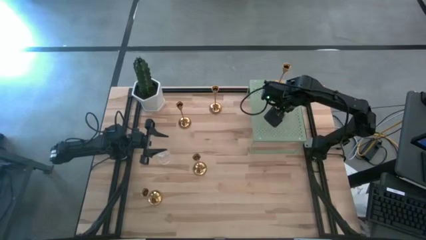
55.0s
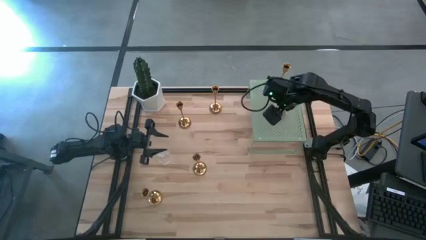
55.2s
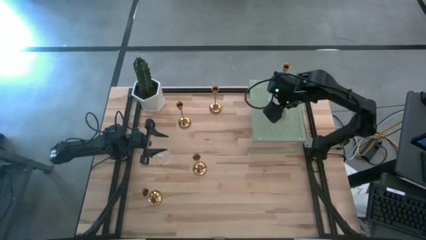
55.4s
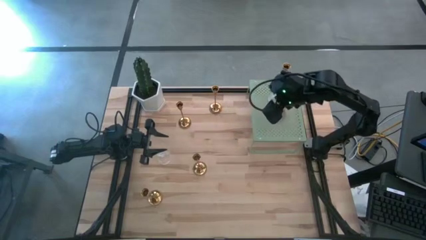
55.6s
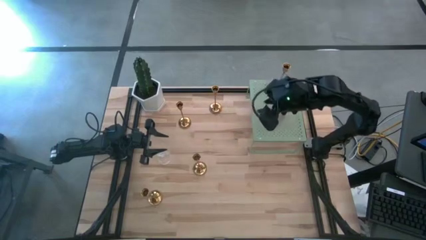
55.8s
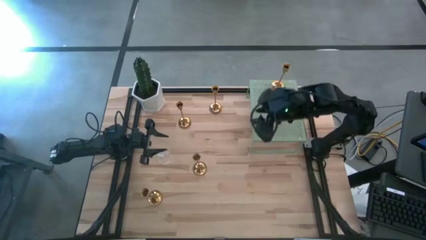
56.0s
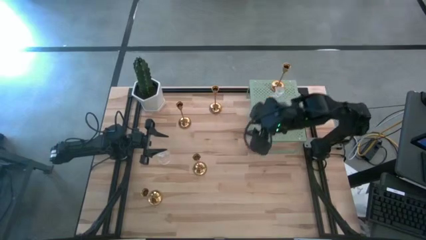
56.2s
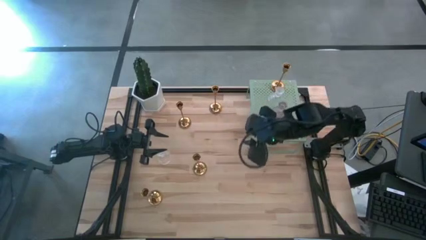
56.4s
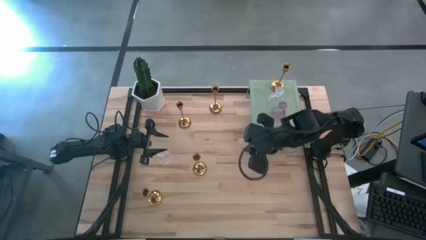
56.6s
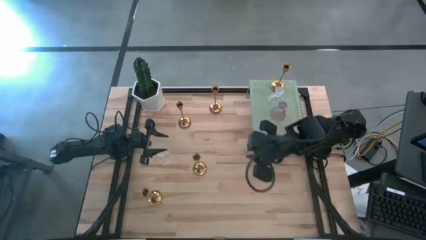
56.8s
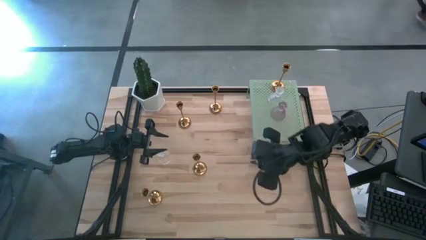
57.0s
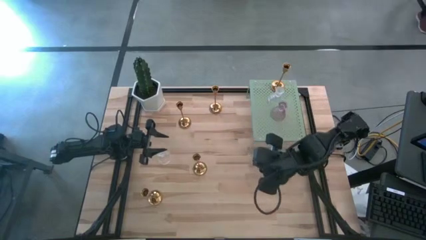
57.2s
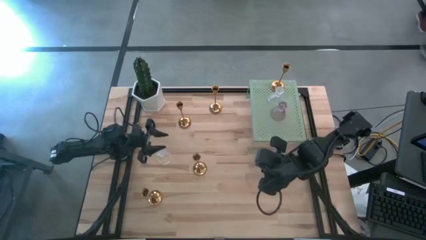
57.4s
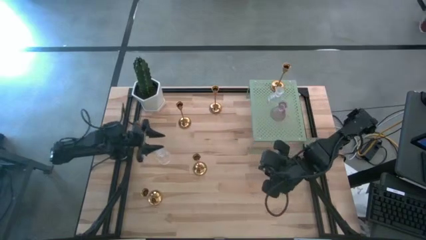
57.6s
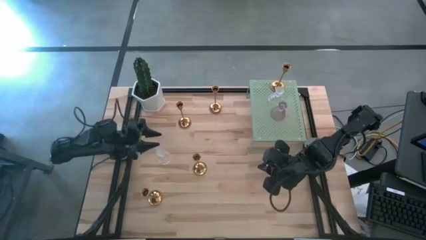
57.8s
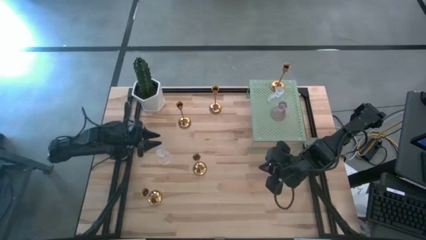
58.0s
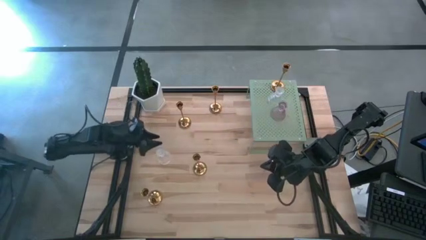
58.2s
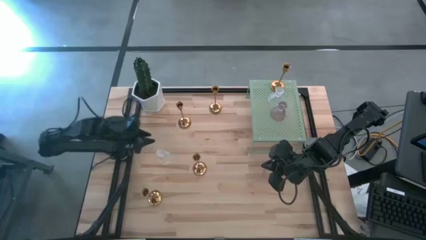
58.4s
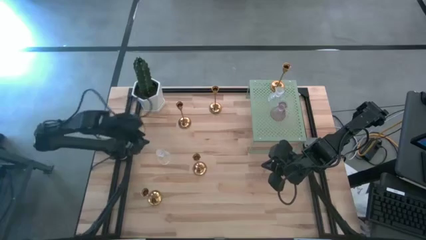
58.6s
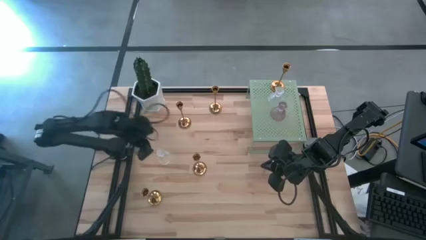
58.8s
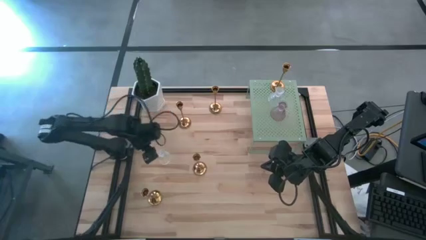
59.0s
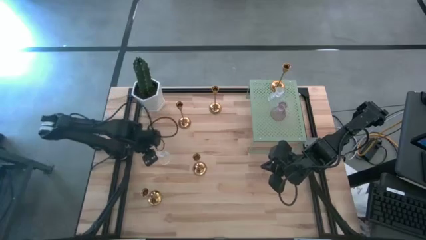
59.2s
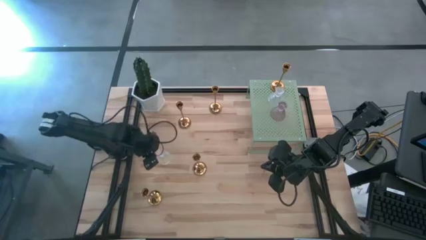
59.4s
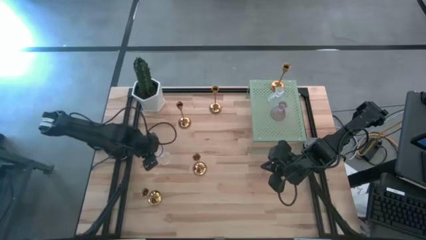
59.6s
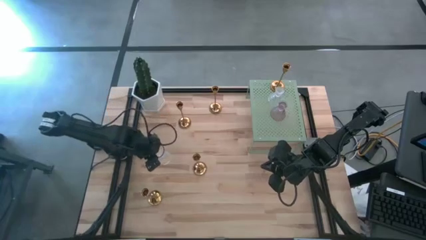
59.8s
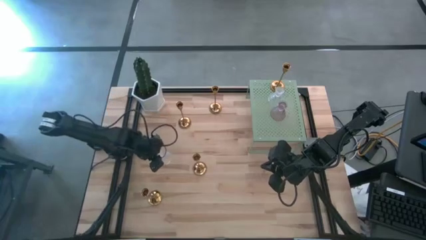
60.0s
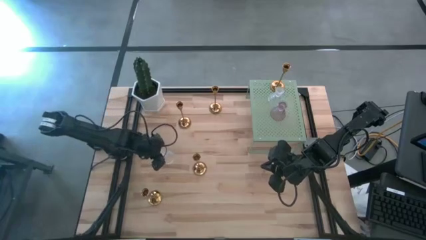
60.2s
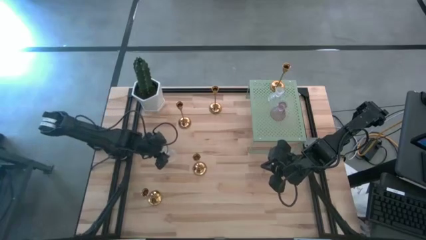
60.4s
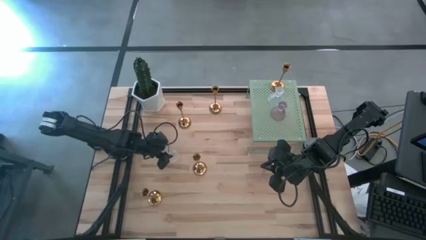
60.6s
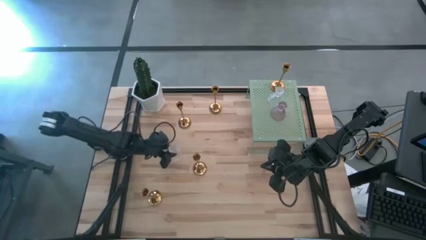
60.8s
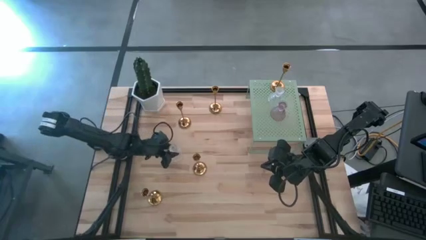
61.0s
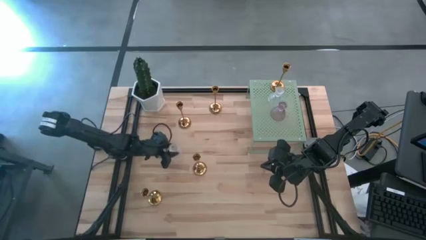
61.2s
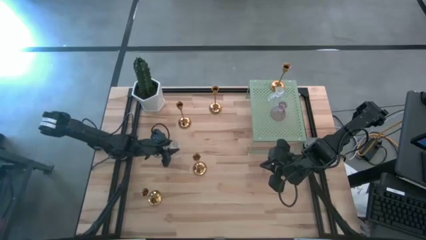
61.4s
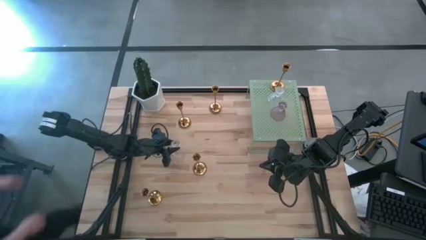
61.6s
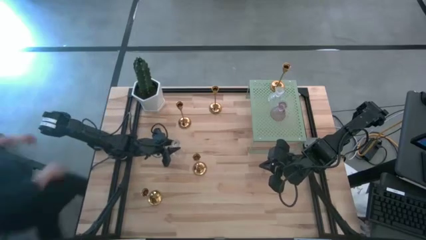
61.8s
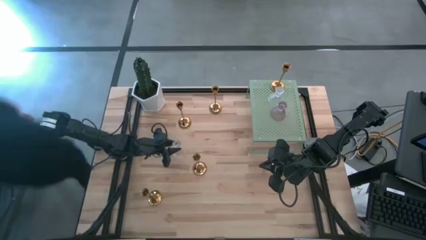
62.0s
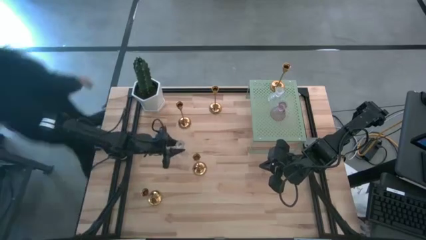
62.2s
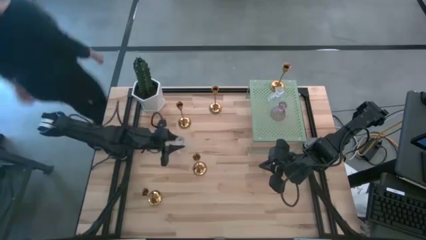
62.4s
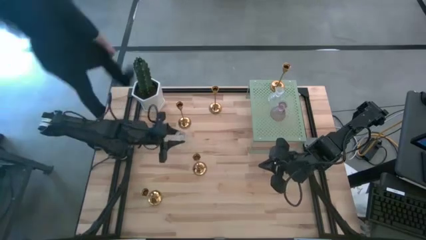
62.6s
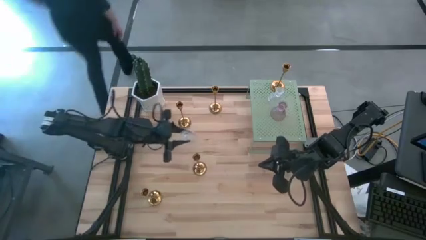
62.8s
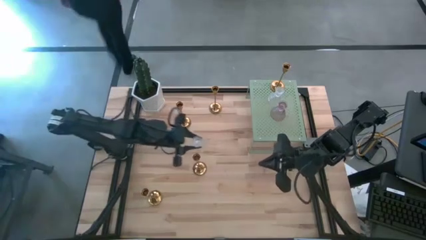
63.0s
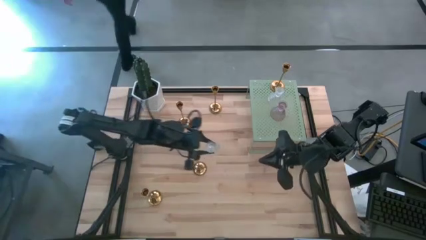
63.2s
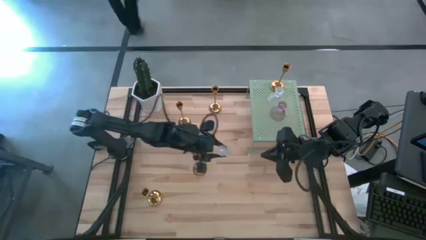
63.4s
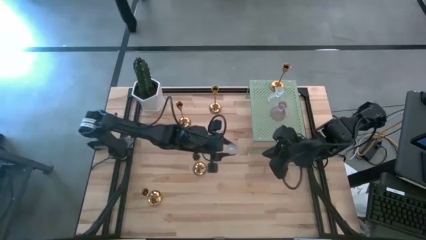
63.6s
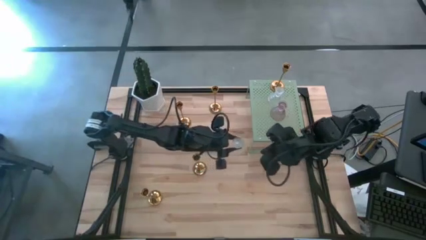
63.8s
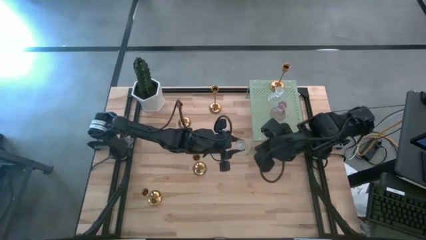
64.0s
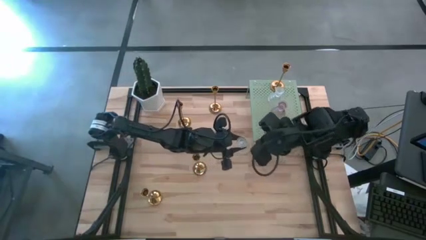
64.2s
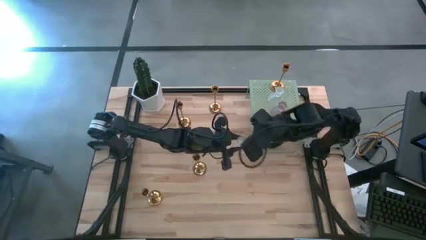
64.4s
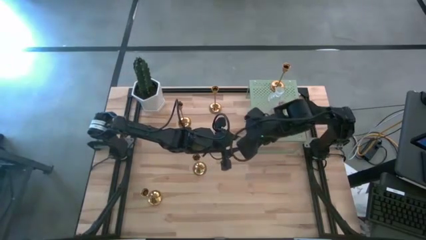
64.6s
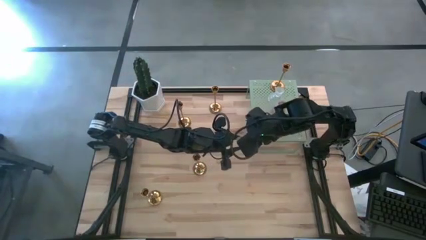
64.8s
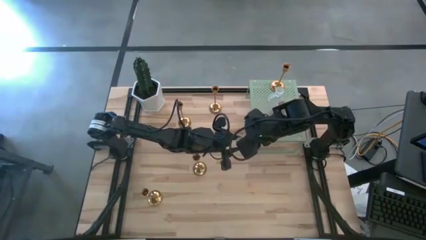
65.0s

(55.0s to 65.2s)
Task: Pick & Place candle stick holders
Put the transparent glass candle holder on the shelf

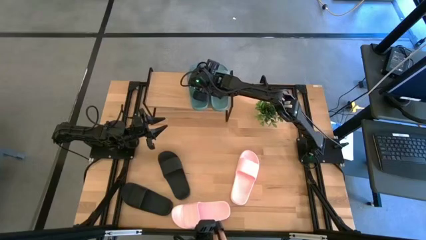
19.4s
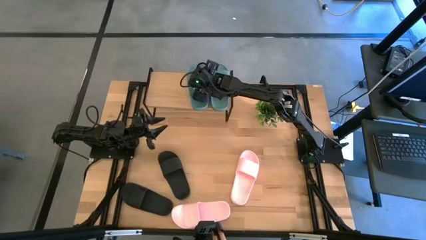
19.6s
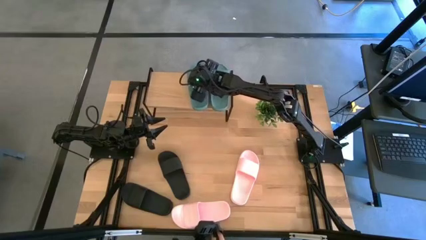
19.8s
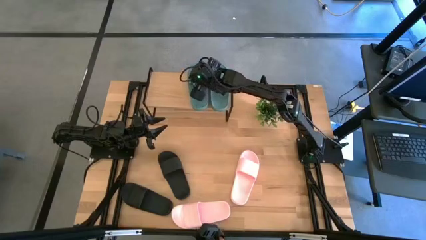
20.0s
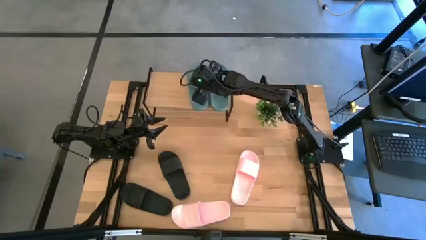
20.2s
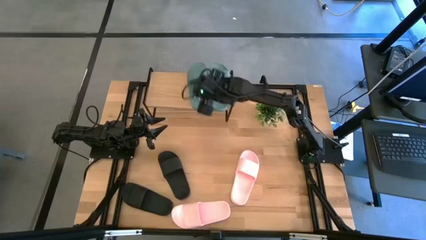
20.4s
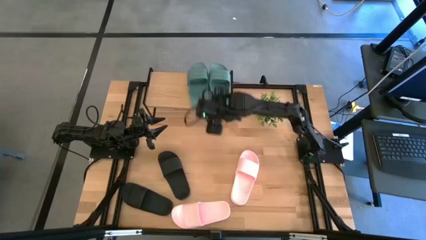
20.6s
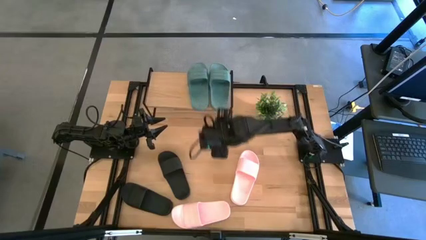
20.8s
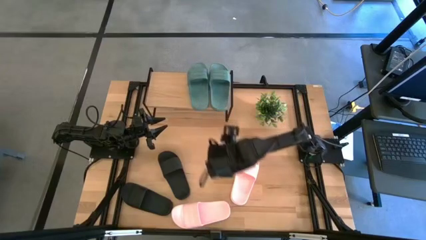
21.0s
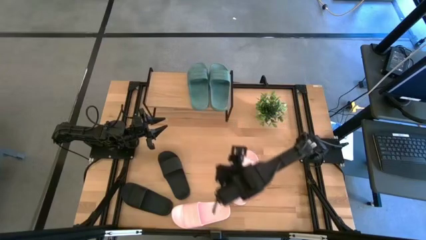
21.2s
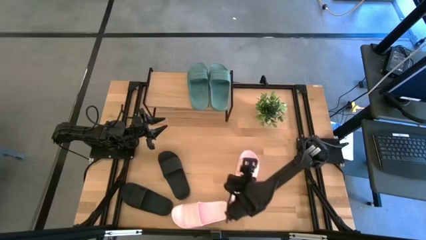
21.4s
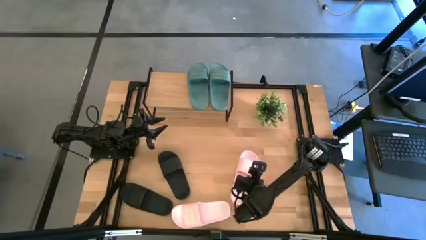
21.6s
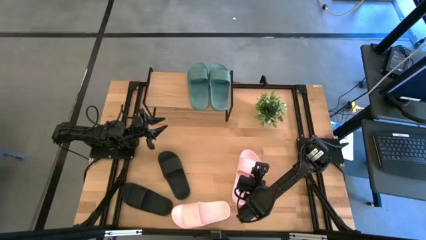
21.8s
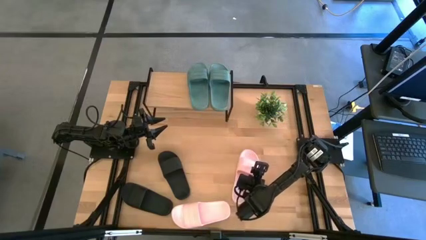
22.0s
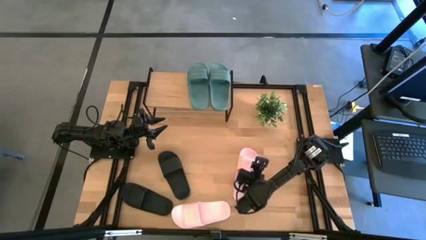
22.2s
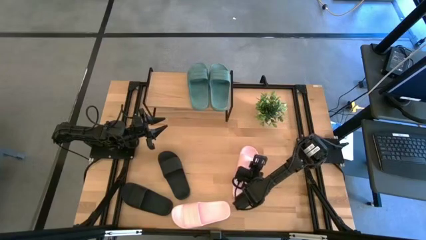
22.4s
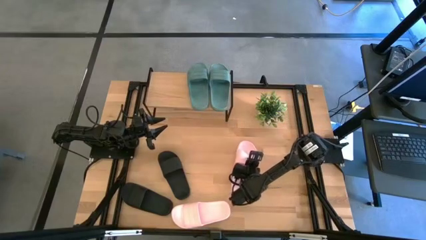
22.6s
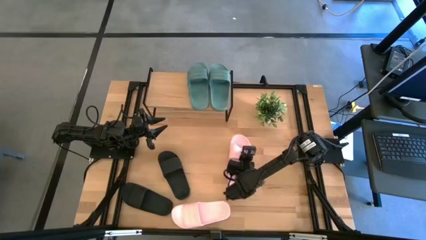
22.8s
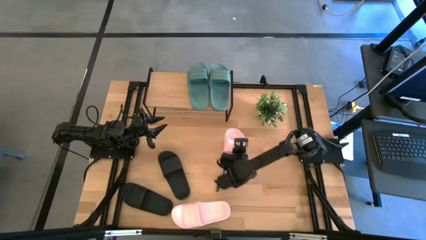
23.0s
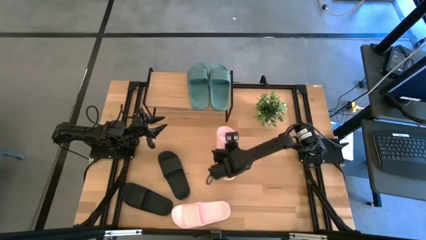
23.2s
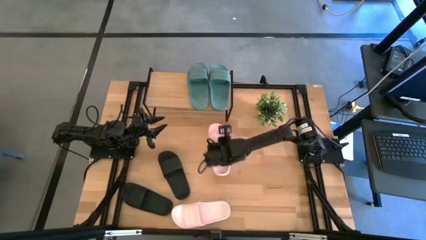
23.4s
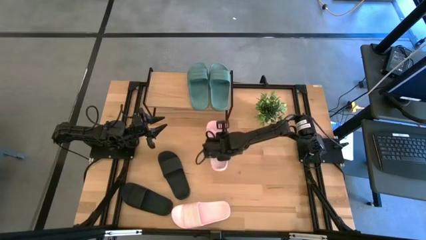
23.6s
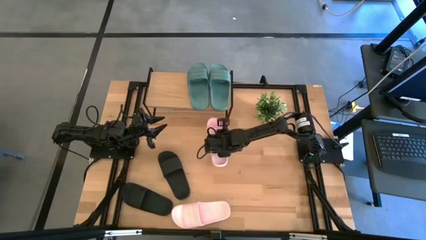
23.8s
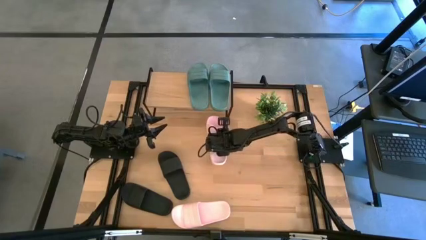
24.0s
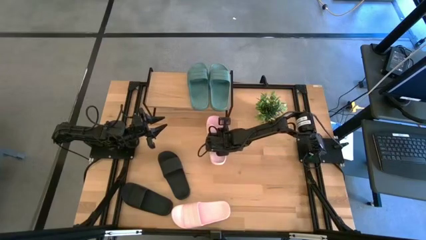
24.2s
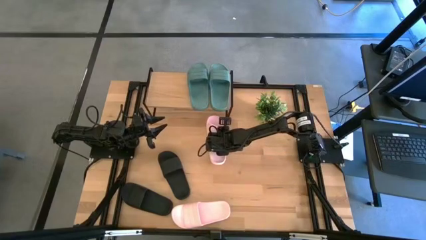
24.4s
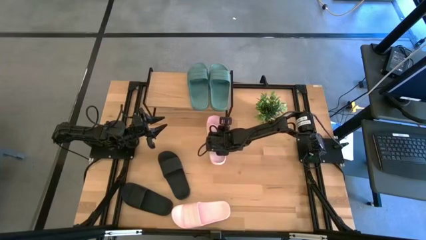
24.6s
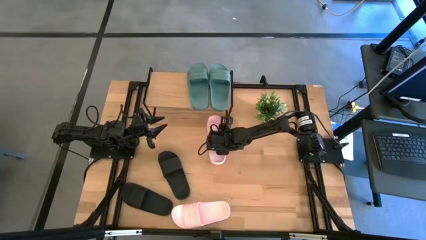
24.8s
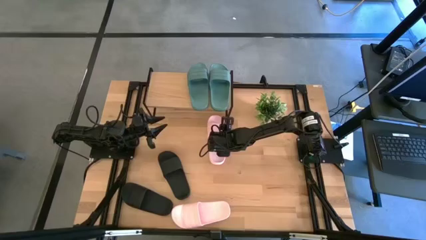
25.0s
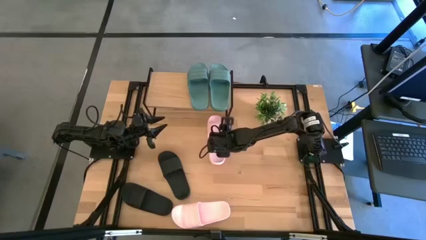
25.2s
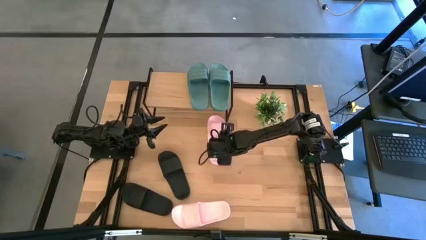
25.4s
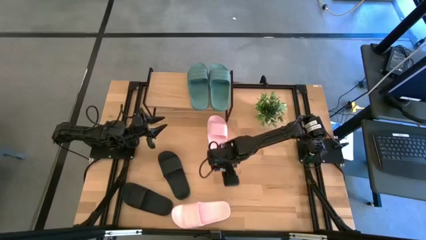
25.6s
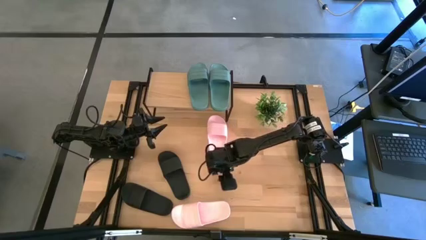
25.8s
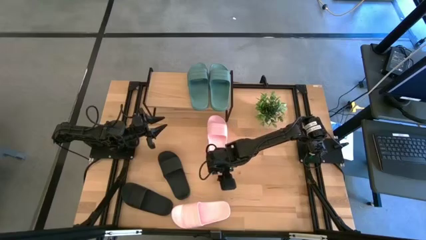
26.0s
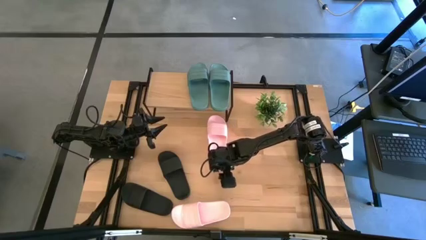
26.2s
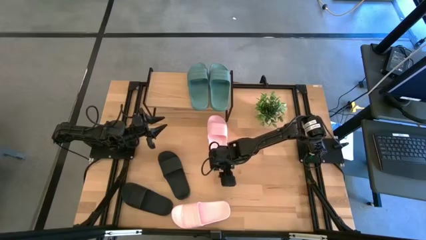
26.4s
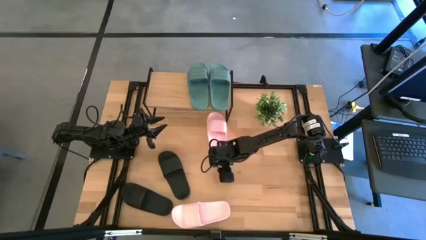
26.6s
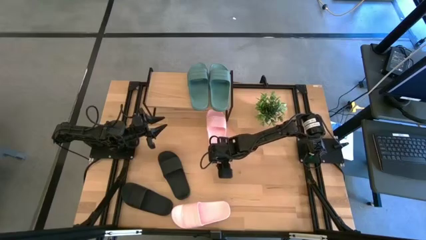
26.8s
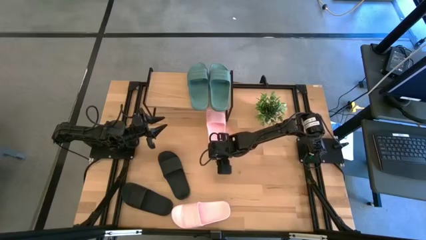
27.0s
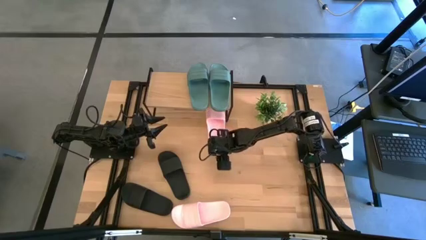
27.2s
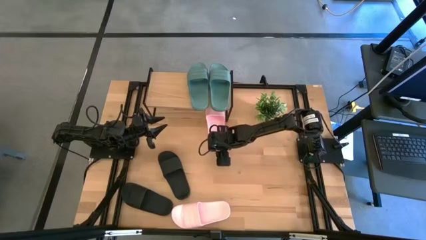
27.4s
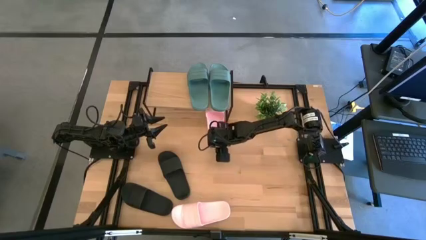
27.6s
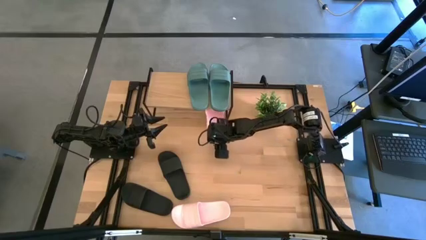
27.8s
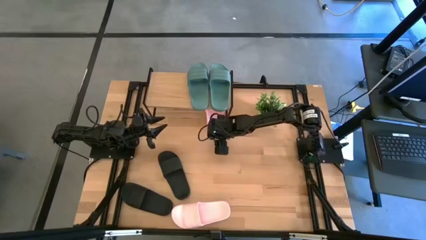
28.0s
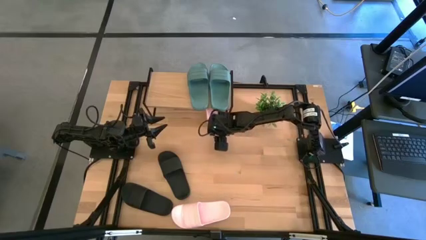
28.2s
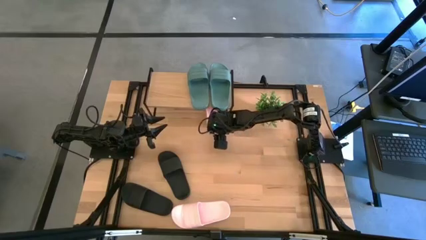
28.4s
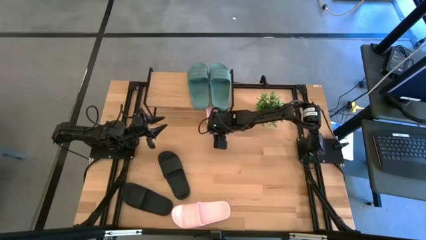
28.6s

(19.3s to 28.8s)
Task: Pick and place slides into the shelf
Put the top pink slide under the shelf
